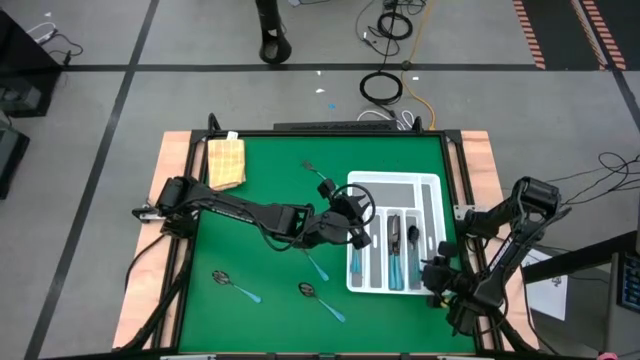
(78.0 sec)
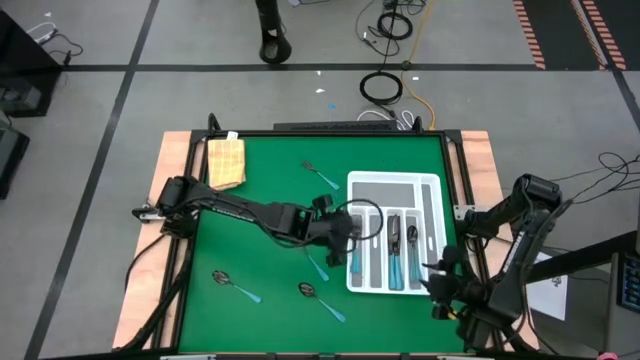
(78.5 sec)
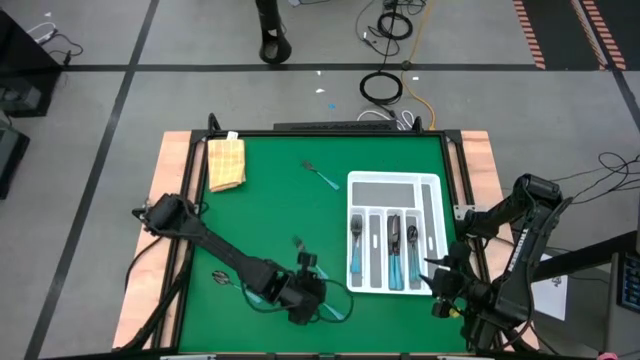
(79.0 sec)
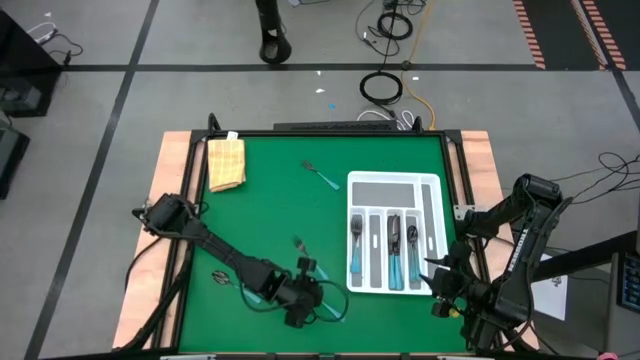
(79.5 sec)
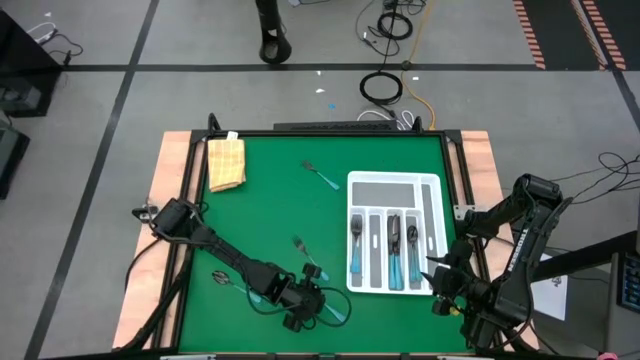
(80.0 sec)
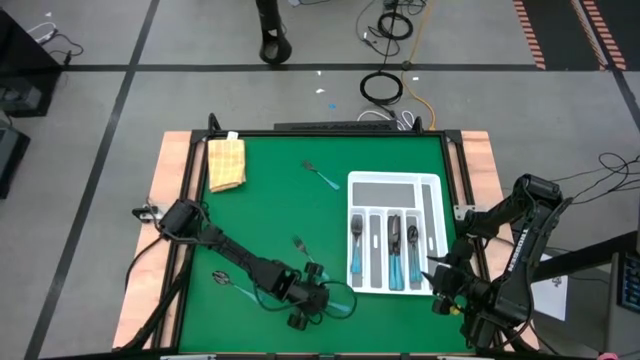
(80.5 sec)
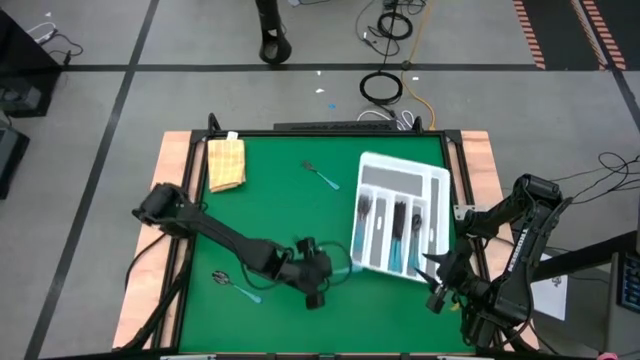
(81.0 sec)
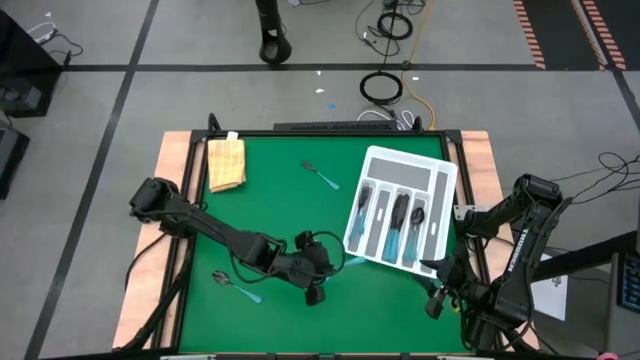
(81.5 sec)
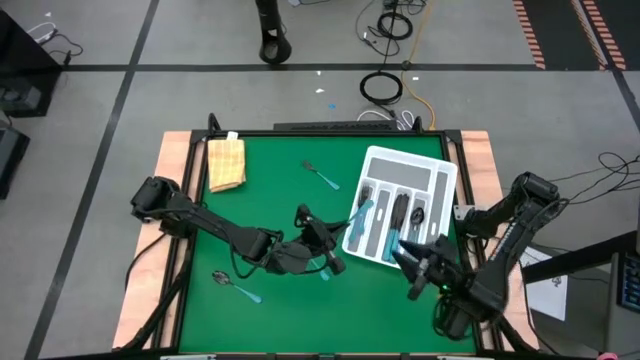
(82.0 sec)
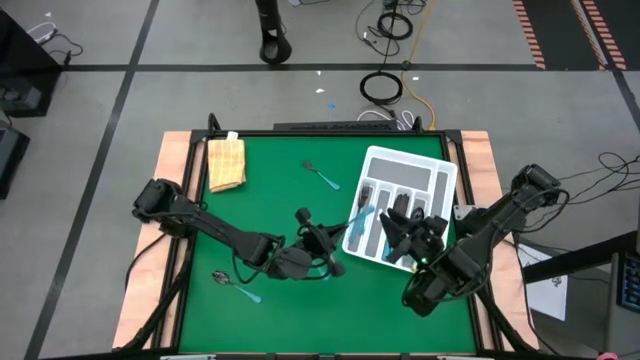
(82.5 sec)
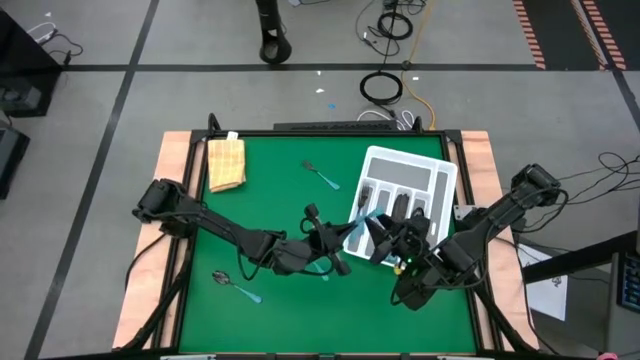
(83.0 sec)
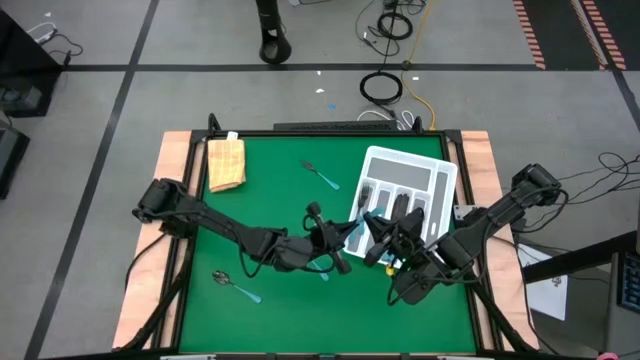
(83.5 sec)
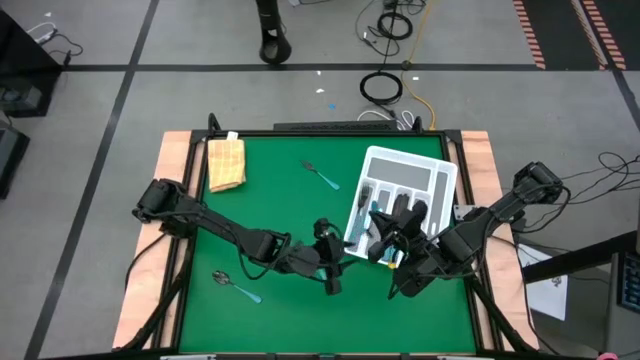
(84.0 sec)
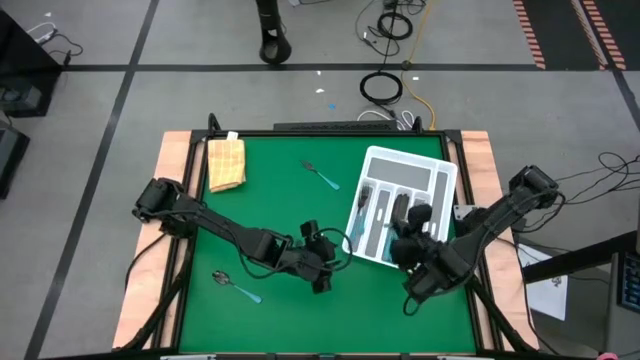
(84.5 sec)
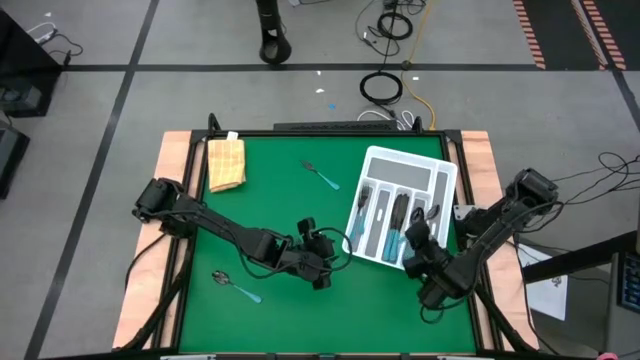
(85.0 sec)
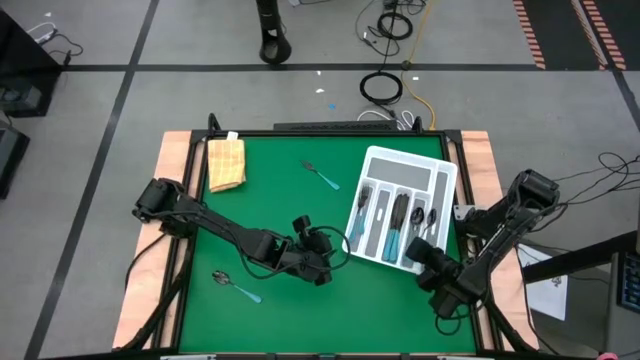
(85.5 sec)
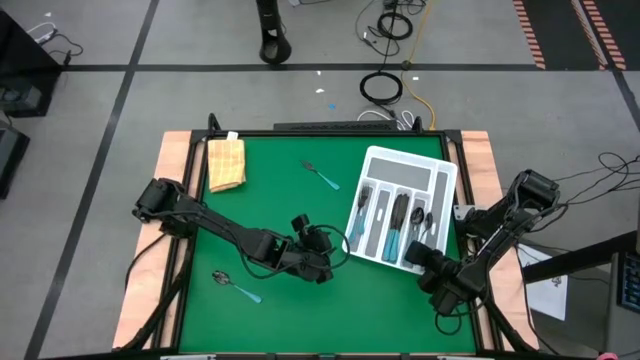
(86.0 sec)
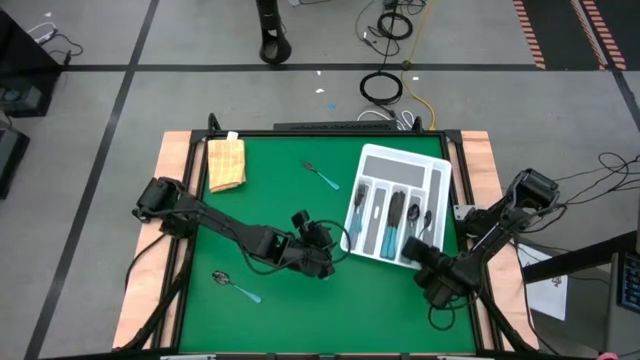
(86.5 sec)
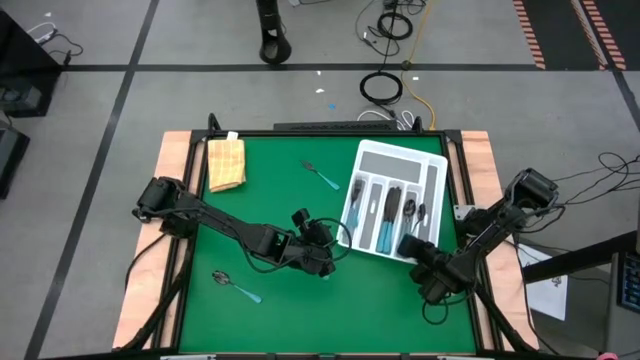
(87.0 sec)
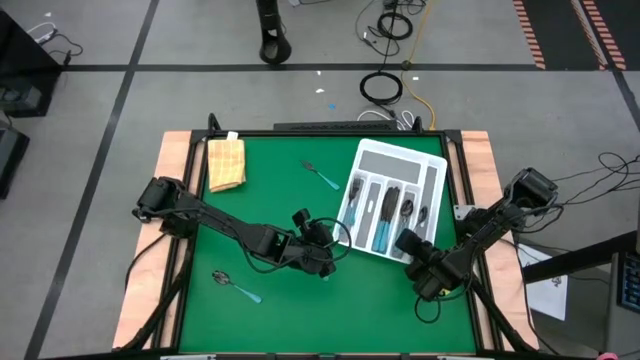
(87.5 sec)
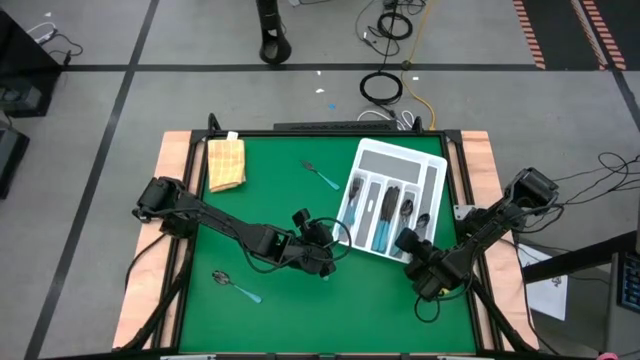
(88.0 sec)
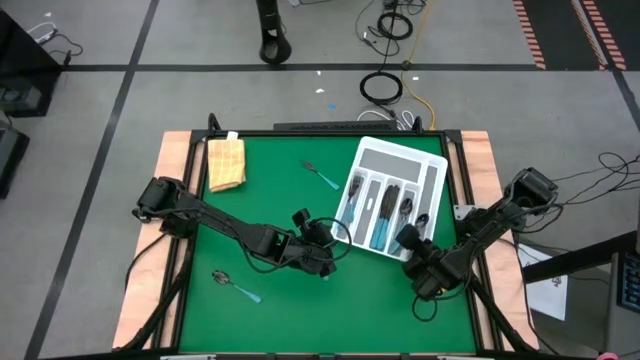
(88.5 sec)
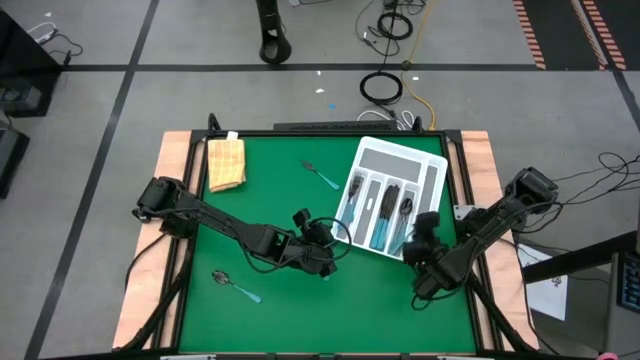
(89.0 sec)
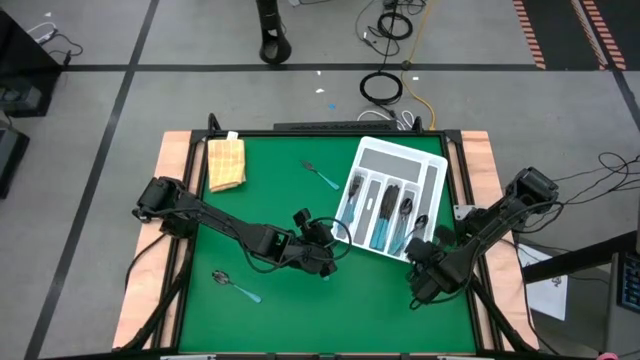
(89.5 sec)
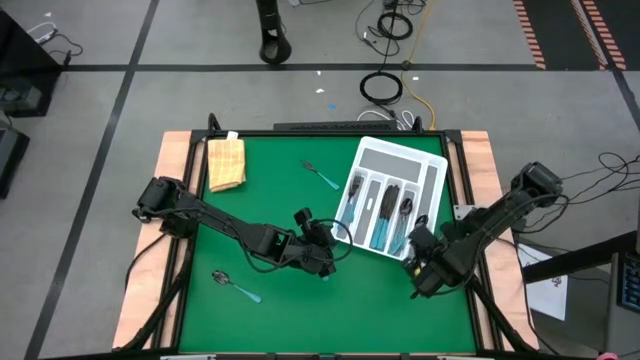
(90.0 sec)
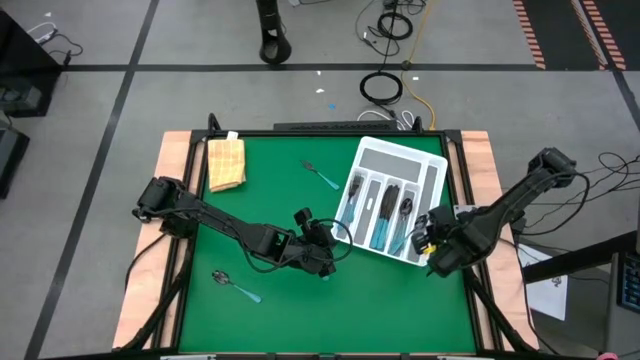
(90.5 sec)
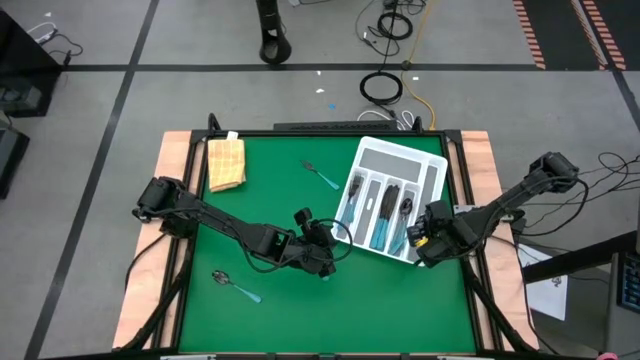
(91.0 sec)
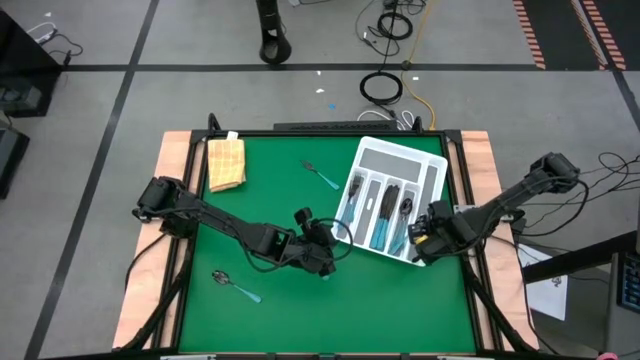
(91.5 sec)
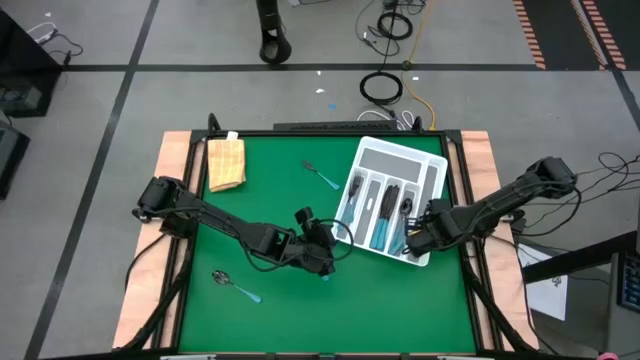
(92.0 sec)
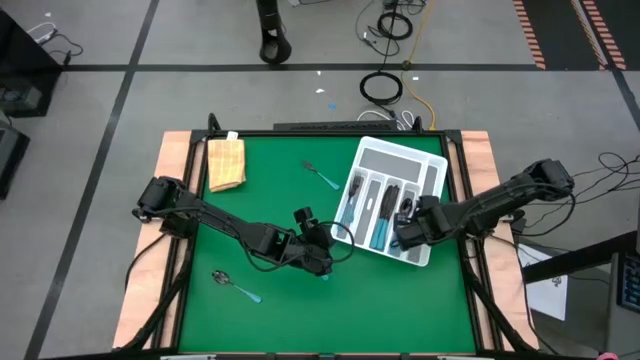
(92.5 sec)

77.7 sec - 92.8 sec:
Task: Sort silverware
Put the right blue spoon into the tray

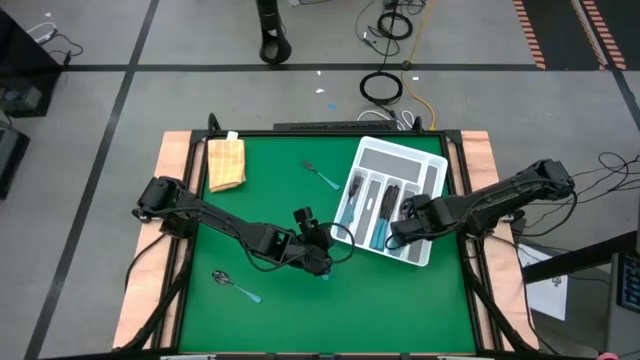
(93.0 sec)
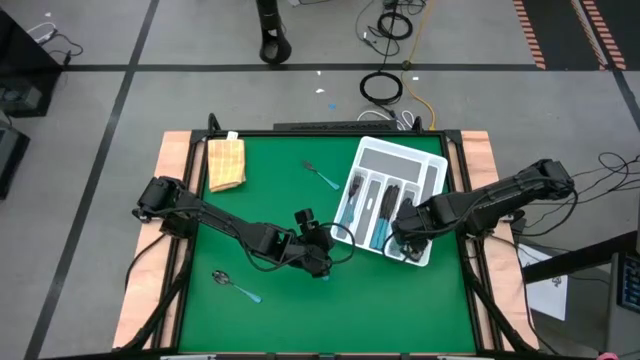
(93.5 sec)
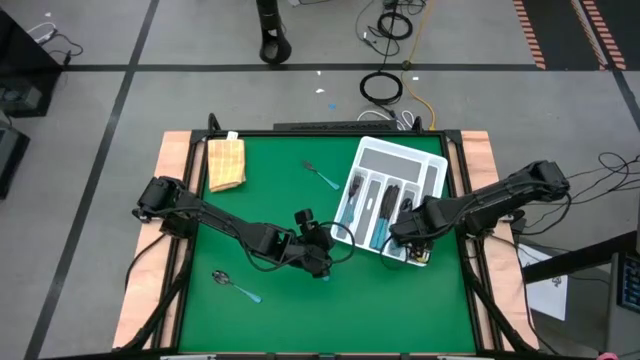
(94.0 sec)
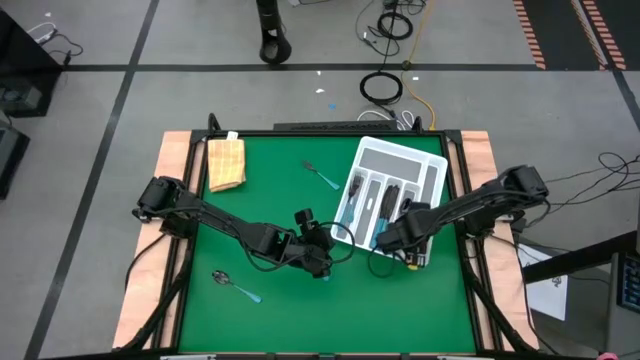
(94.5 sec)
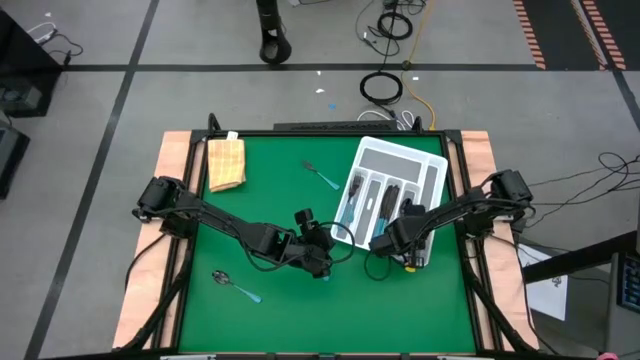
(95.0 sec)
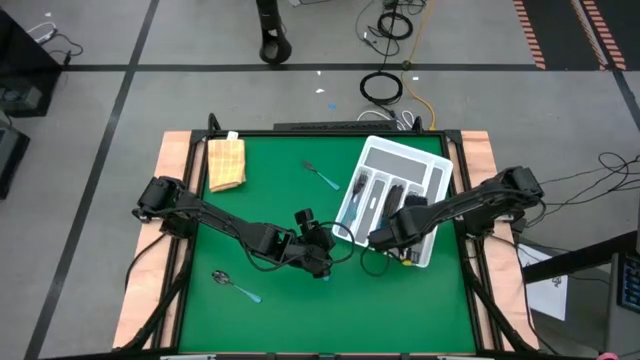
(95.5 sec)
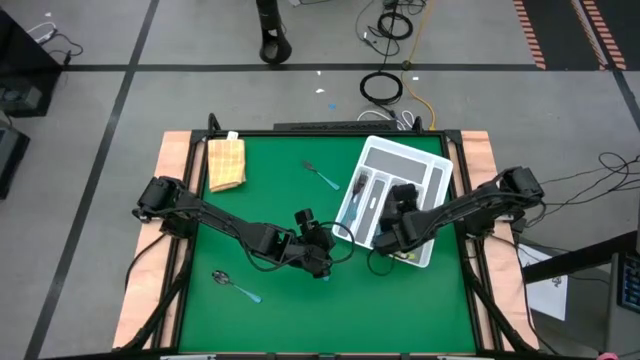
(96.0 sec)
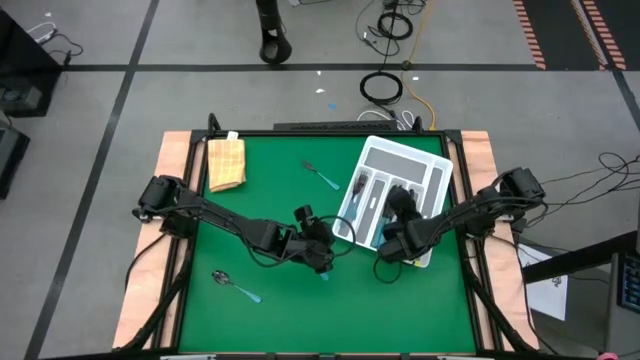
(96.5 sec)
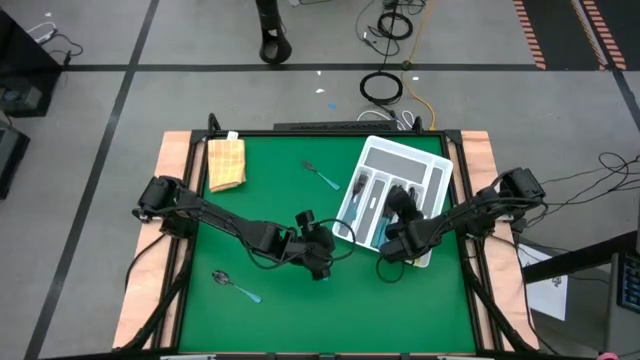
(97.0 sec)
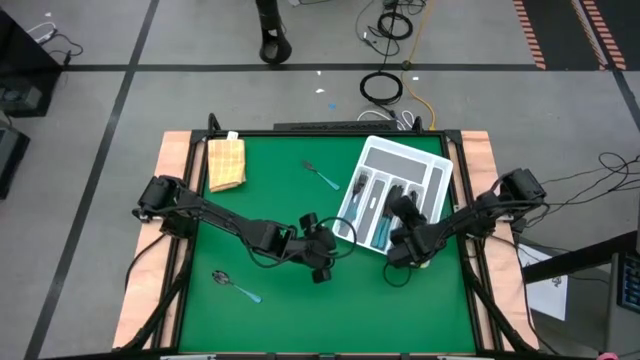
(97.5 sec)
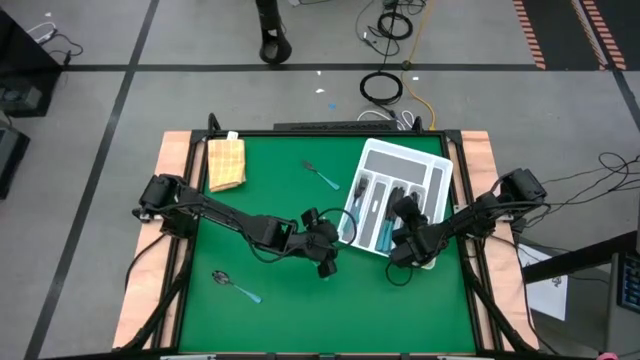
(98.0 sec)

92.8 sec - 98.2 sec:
Put the right blue spoon into the tray

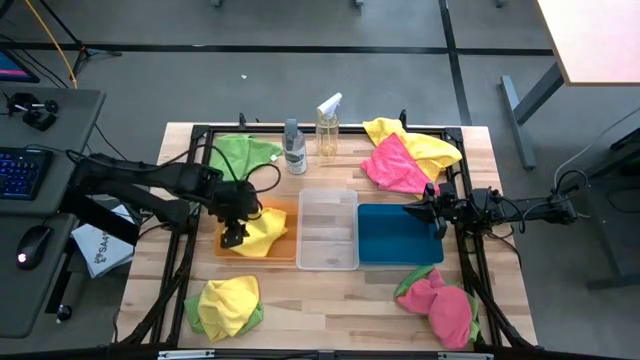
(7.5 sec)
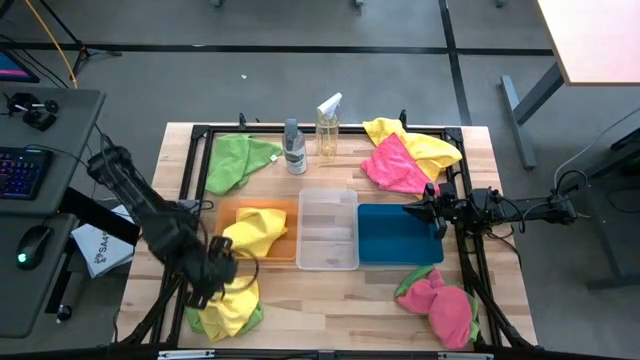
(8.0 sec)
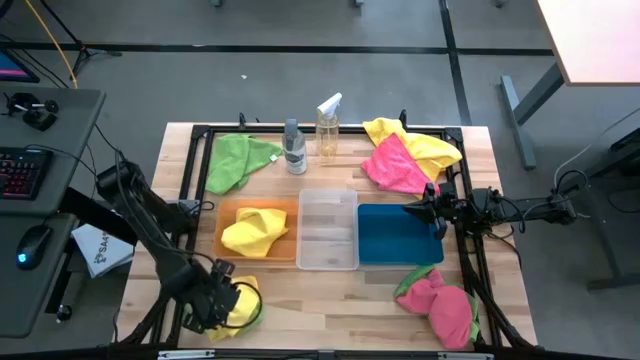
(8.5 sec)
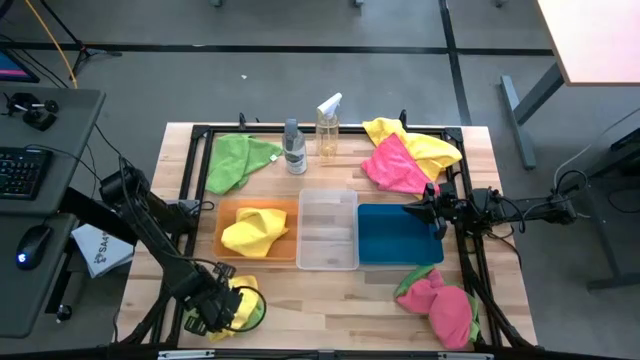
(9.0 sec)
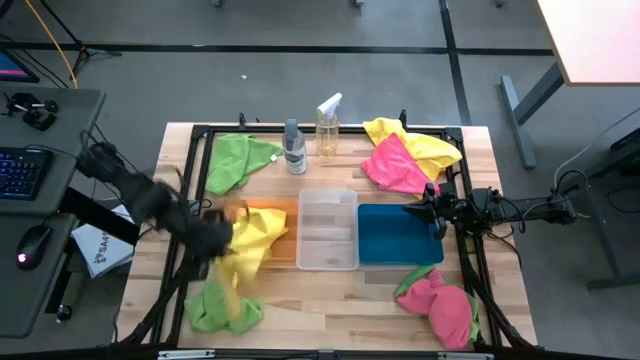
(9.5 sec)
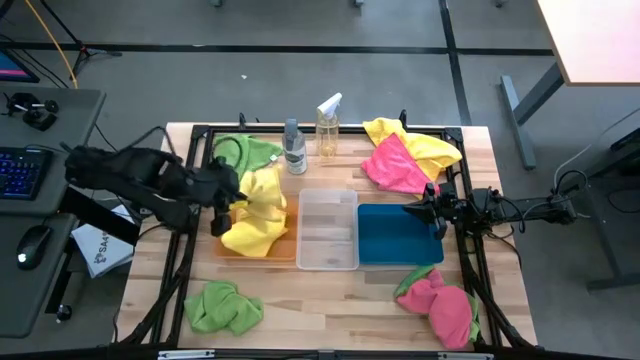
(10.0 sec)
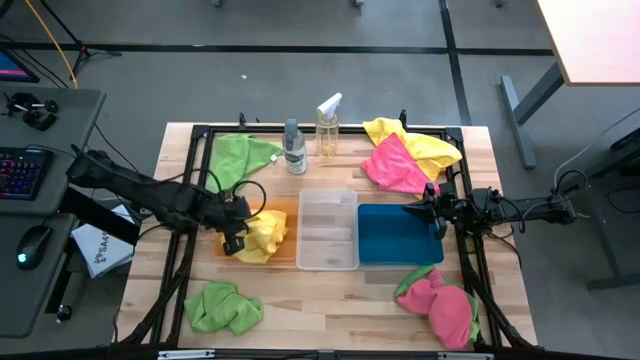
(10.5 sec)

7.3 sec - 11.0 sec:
Task: Sort microfiber towel by color & place in baskets
Put the bottom yellow microfiber cloth into the orange bin
